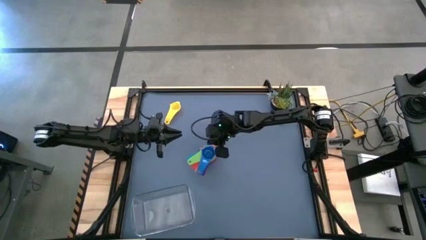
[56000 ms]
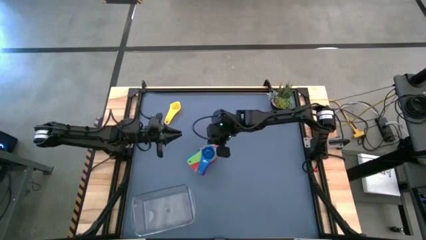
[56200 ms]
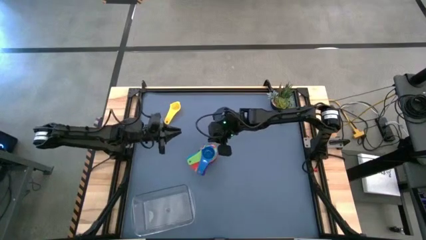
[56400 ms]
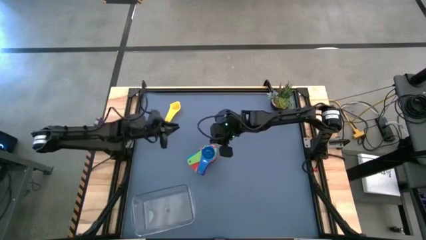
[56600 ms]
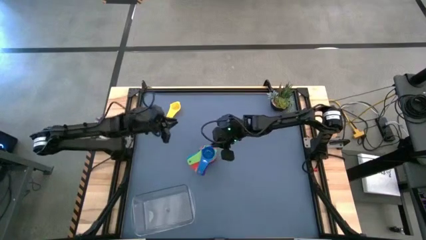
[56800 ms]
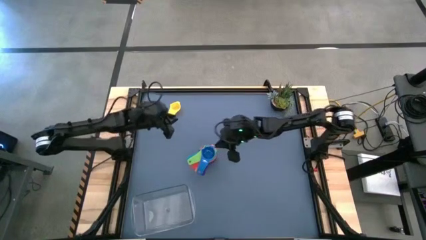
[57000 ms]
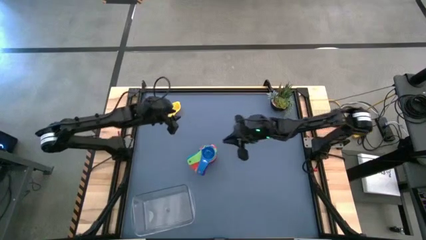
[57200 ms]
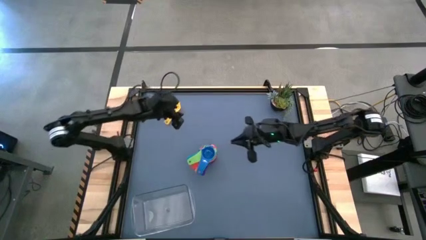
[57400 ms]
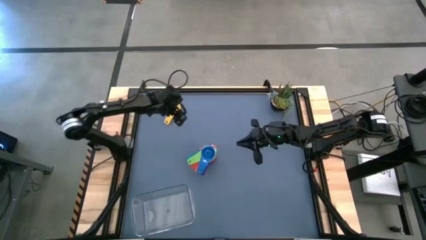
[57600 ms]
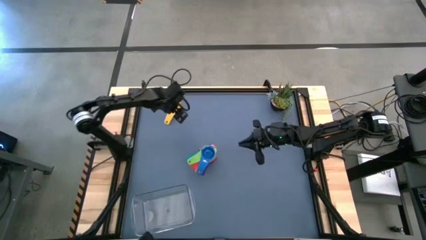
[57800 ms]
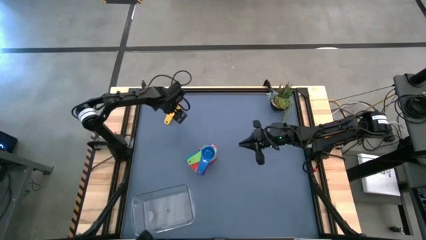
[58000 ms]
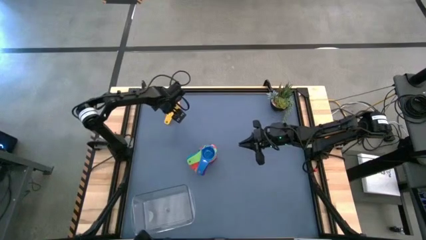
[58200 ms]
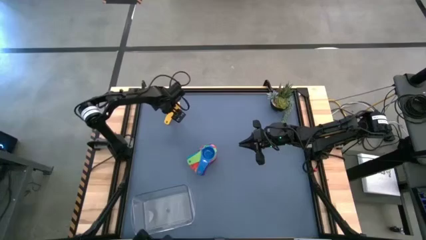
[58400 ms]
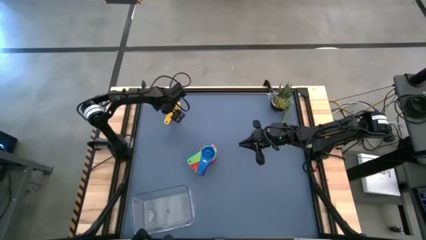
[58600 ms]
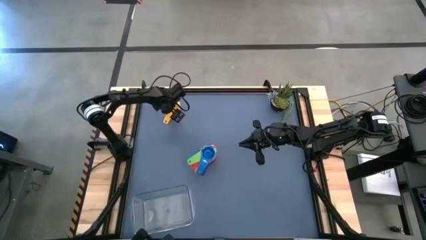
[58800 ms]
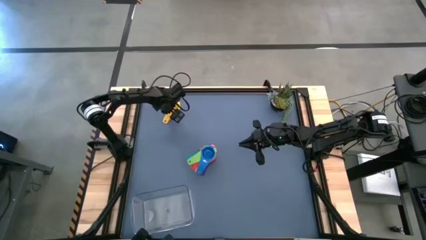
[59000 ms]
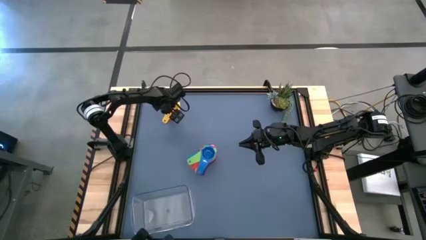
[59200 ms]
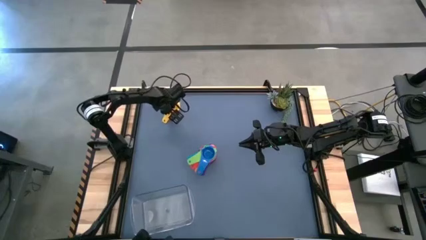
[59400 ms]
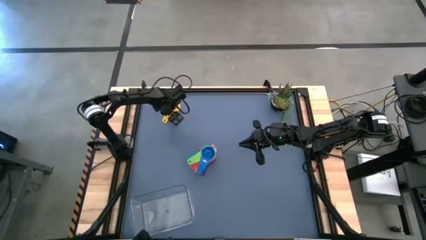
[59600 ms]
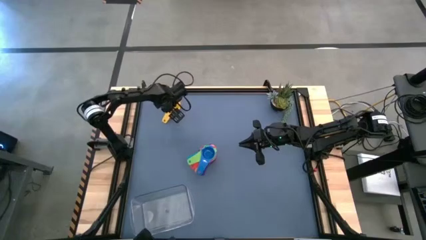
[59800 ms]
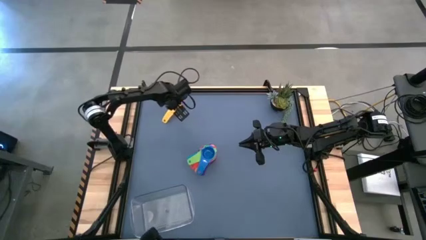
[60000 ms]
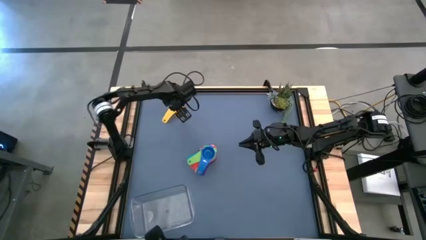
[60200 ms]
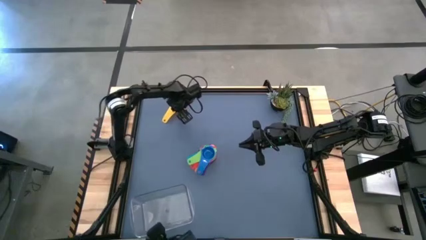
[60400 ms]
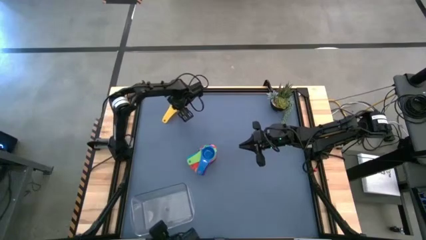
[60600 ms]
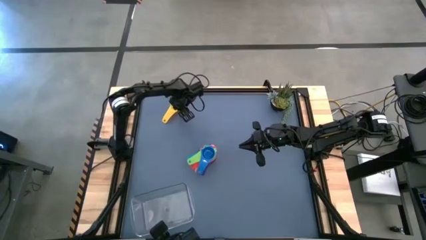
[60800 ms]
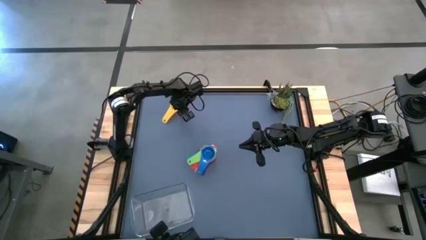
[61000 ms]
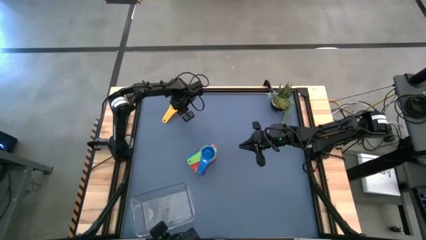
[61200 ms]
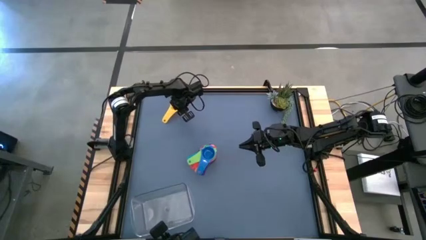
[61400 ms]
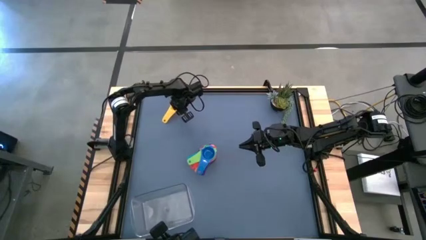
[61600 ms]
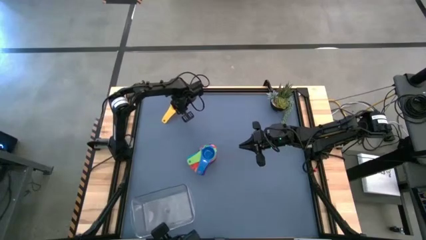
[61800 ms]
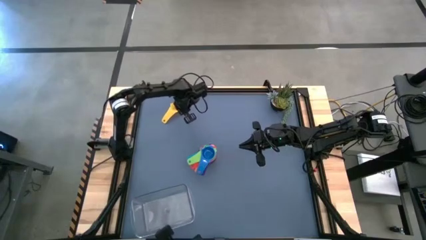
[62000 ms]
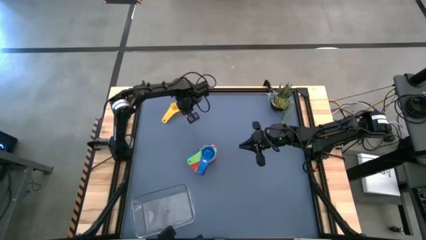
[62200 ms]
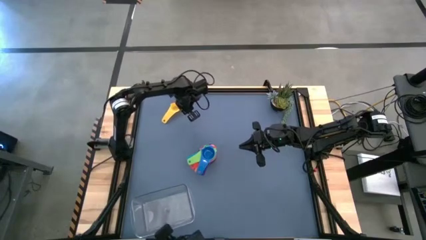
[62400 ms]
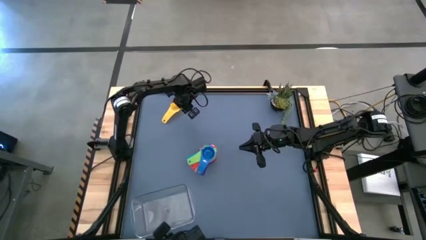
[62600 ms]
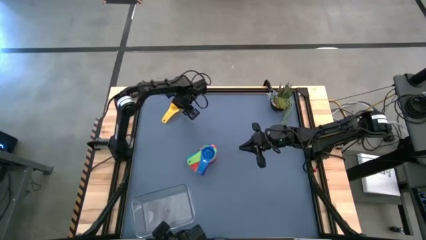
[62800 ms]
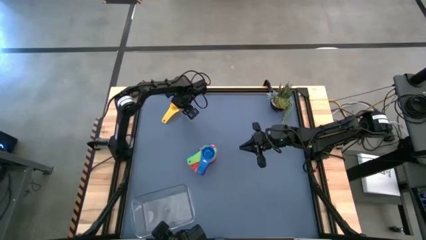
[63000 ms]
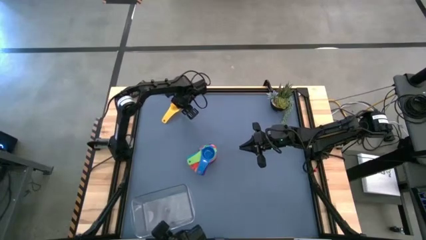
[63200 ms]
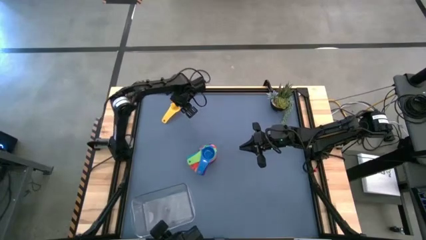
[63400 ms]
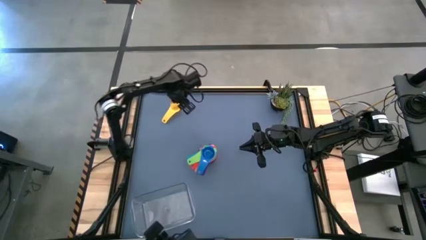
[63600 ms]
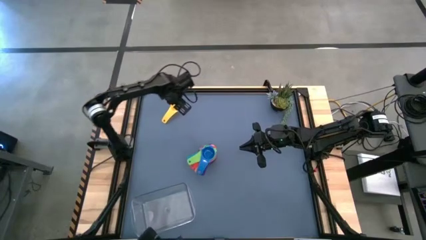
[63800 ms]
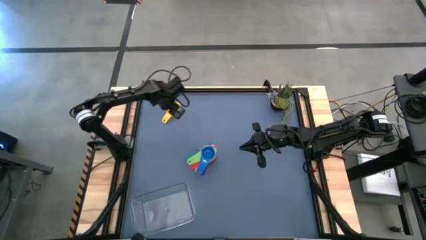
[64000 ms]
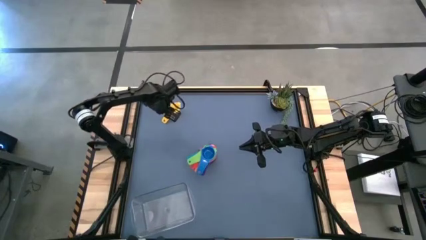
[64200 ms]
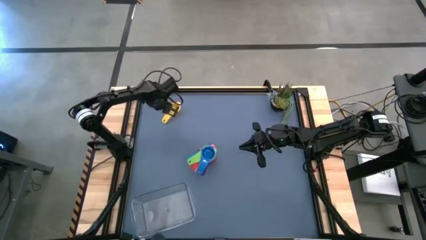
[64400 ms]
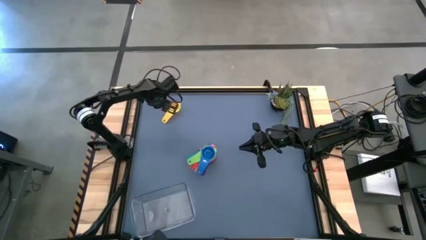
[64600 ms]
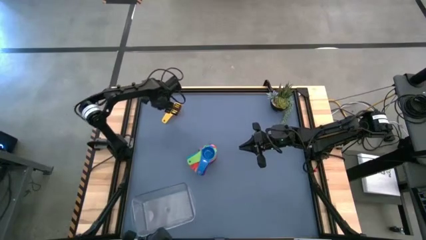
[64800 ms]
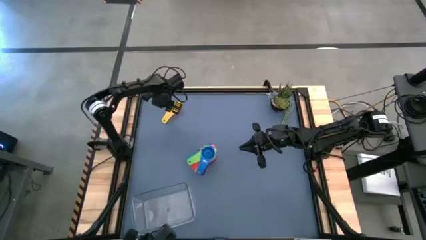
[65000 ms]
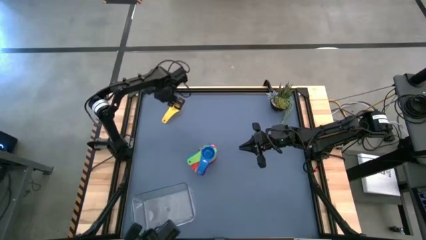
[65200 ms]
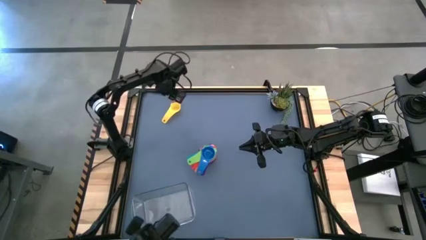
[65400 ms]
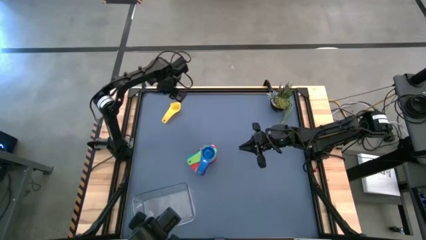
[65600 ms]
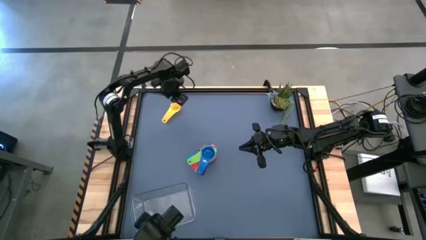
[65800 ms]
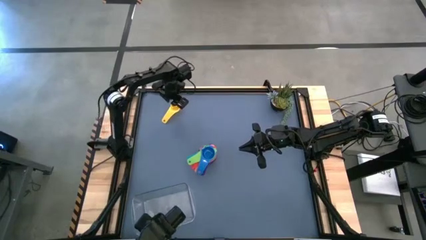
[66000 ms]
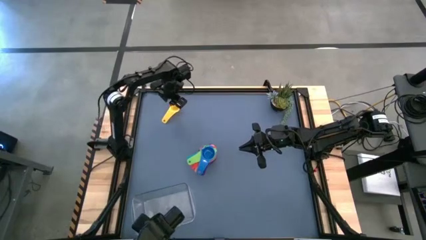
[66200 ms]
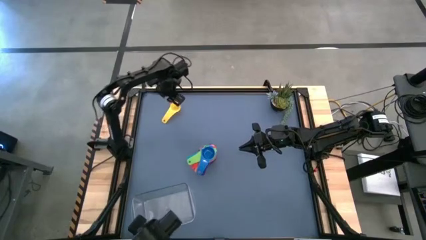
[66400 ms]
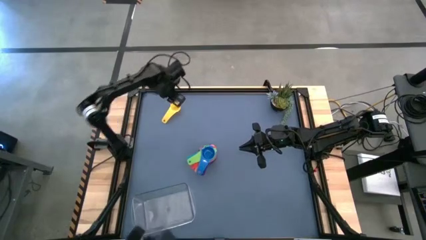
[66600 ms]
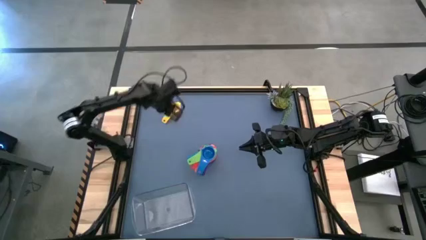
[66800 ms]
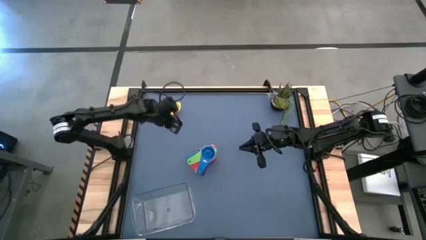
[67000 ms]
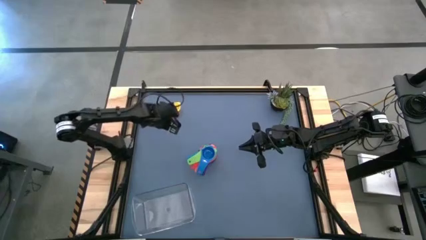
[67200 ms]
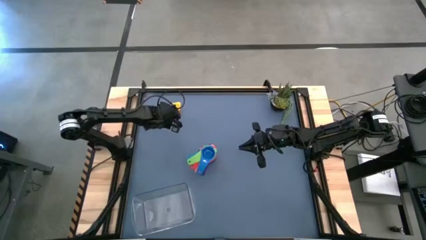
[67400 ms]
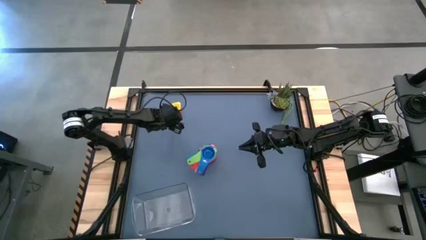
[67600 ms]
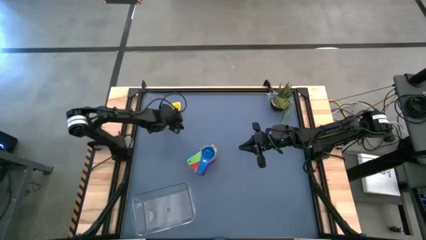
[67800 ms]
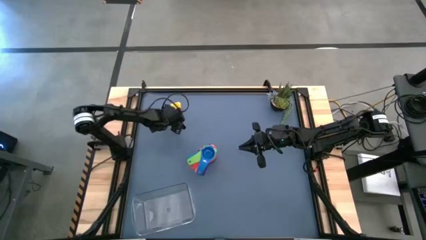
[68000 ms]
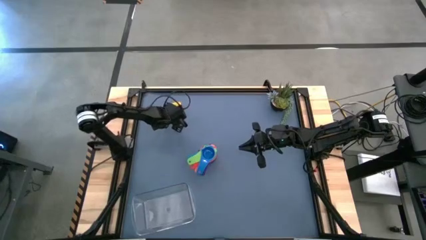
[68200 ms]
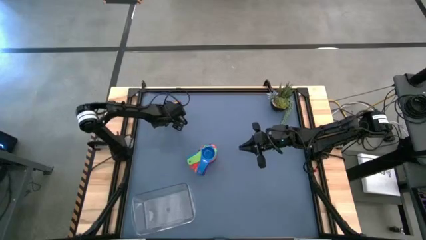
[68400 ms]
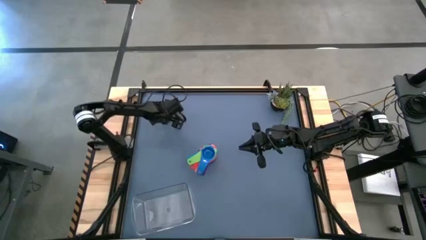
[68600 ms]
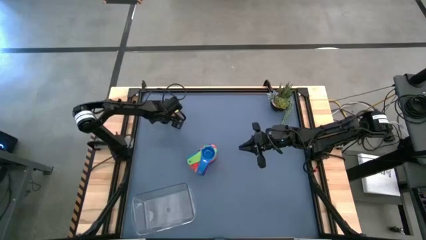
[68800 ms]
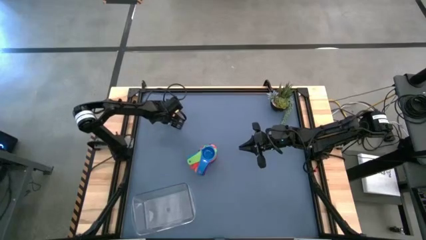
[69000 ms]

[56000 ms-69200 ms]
Task: Nest measuring cups in basket
Stack the yellow measuring cup on top of the blue measuring cup

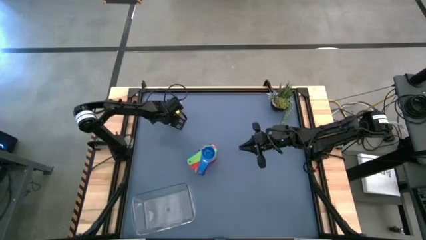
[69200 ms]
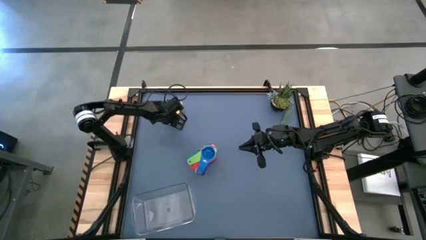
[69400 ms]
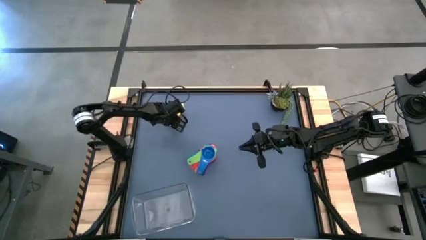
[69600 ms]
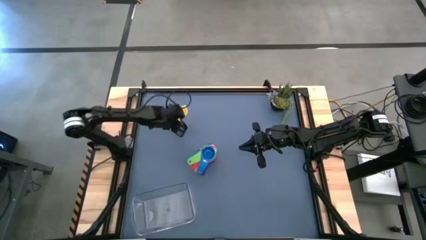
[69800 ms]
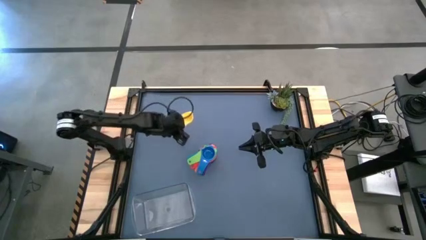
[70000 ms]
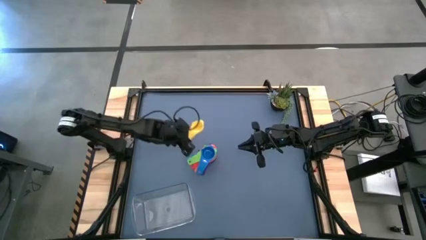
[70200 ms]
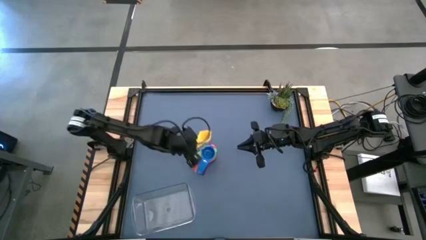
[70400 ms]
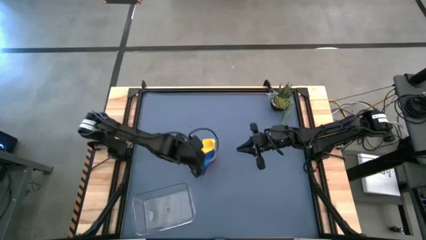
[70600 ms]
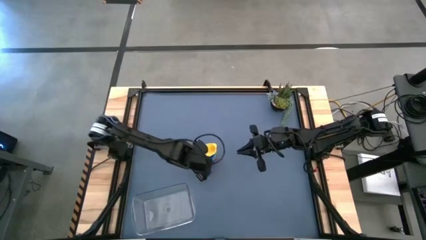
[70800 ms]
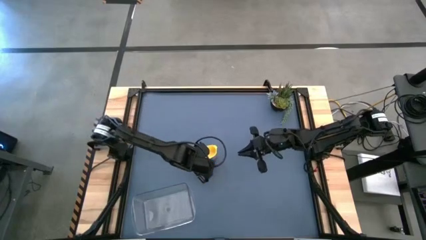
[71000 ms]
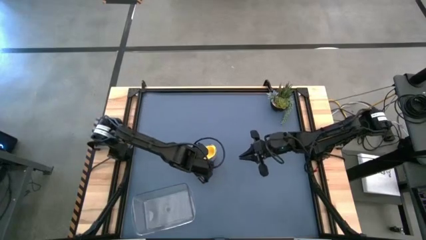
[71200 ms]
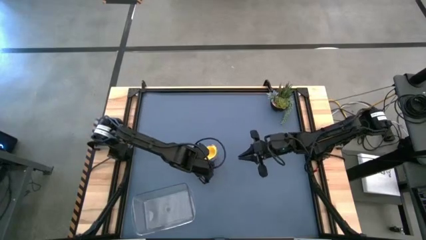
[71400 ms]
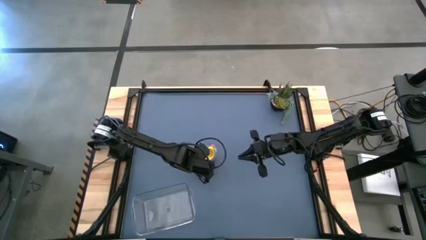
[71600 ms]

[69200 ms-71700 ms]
Stack the yellow measuring cup on top of the blue measuring cup

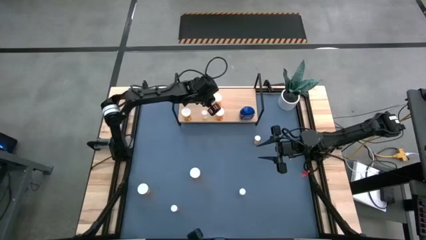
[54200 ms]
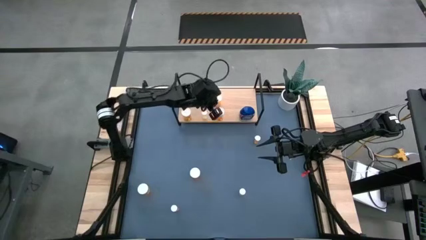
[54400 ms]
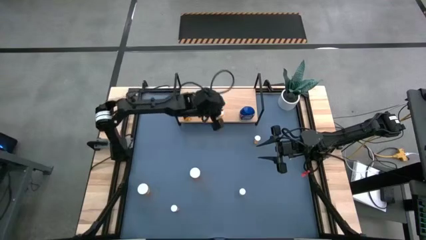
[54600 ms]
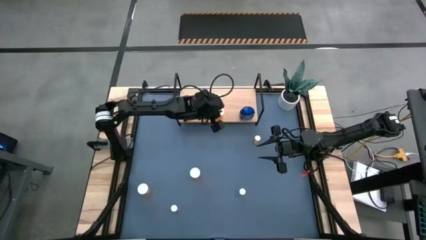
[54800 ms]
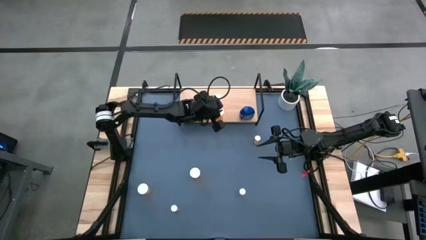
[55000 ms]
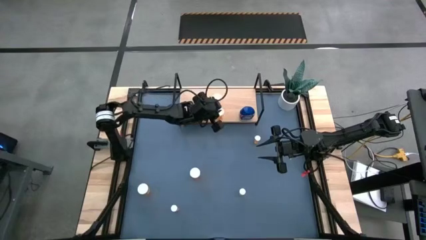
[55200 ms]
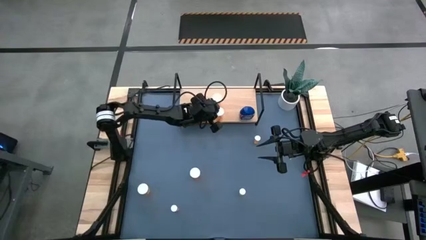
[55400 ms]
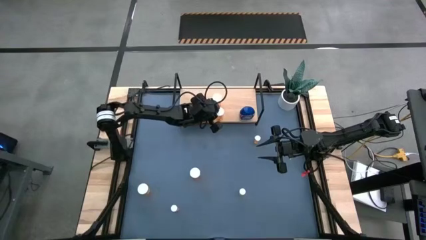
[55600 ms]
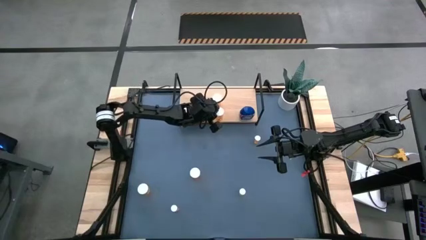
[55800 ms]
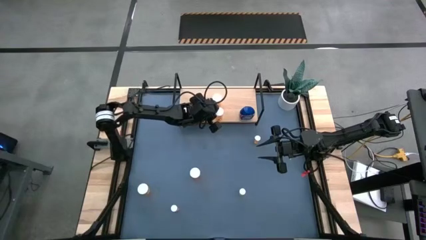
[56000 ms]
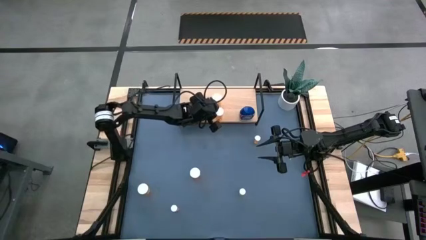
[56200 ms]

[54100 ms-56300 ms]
Task: Pick and place medicine bottles onto shelf by color
Adjust the orange pill bottle
